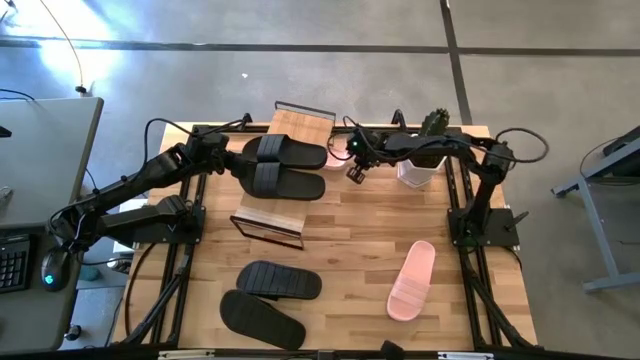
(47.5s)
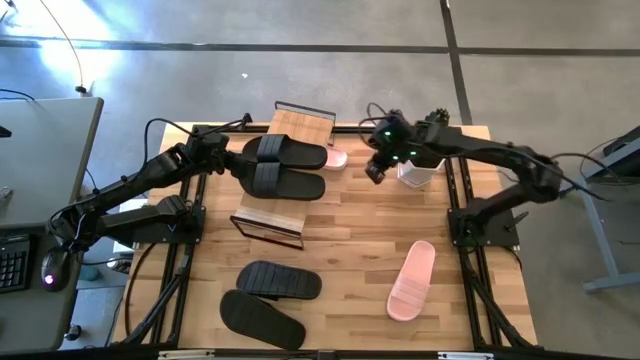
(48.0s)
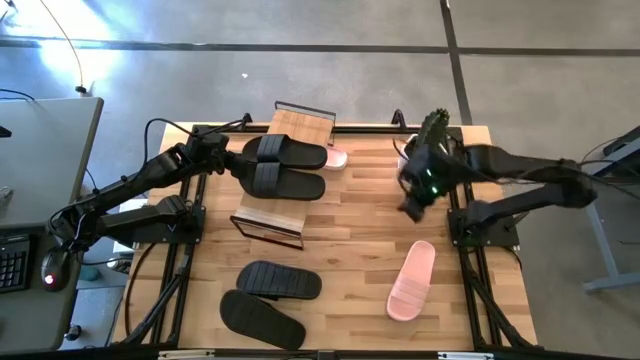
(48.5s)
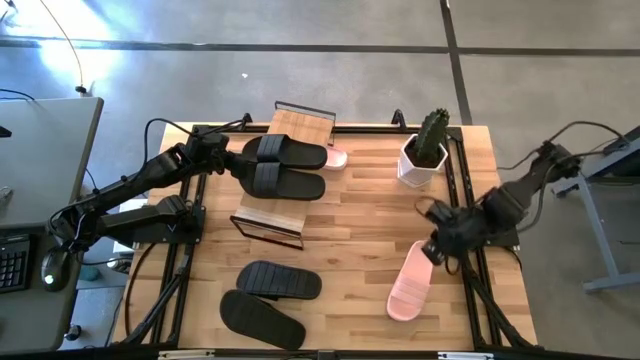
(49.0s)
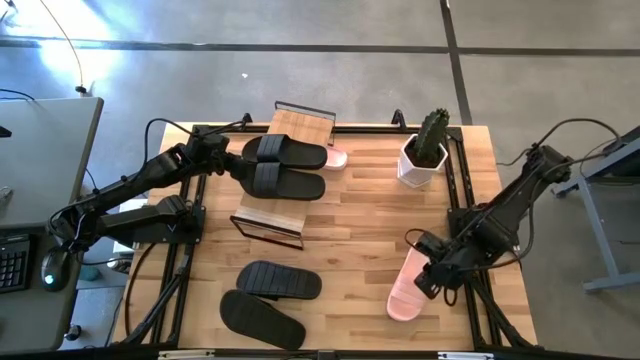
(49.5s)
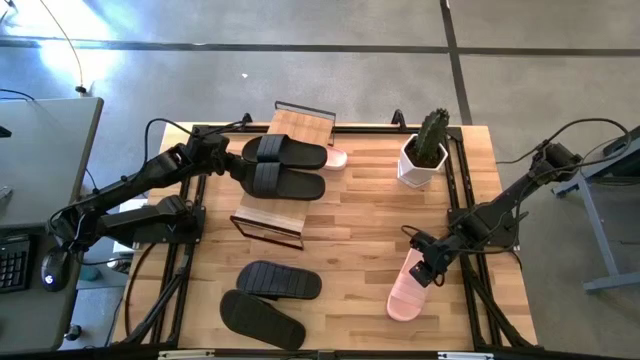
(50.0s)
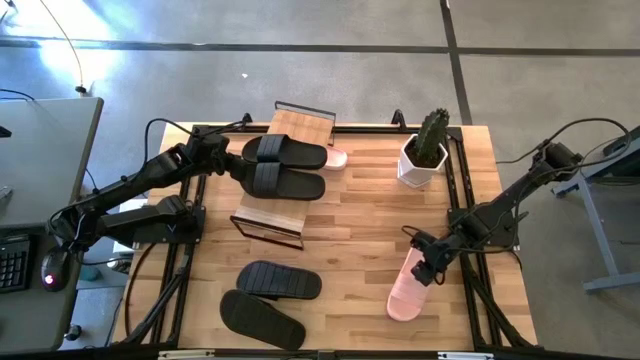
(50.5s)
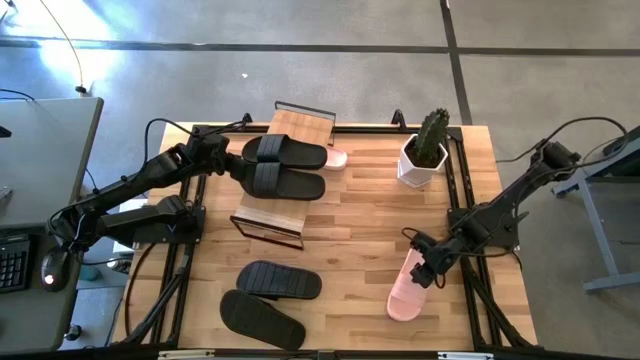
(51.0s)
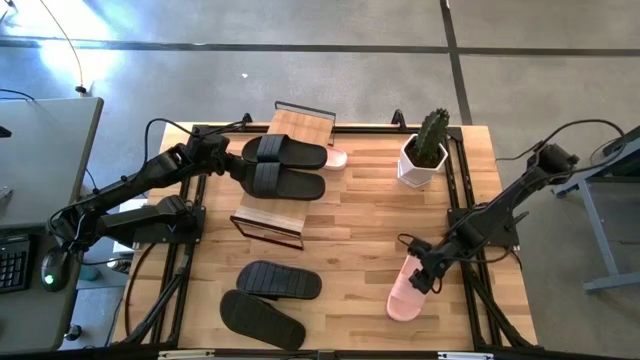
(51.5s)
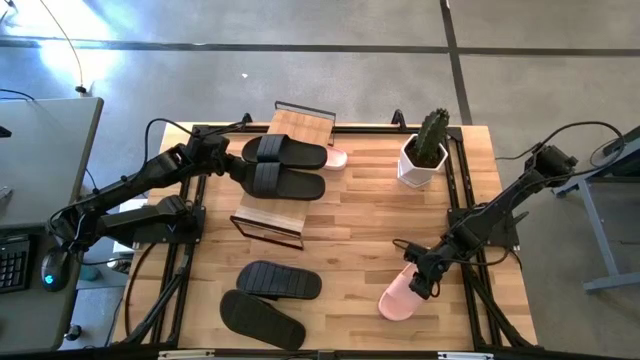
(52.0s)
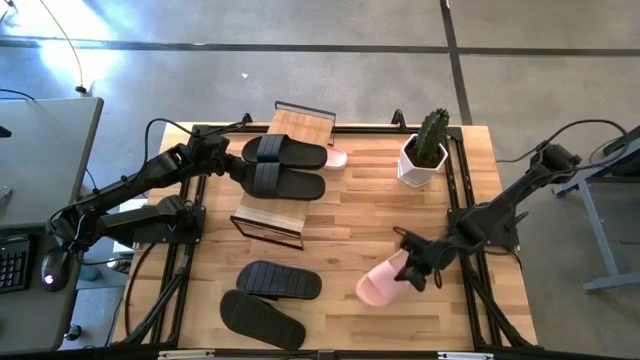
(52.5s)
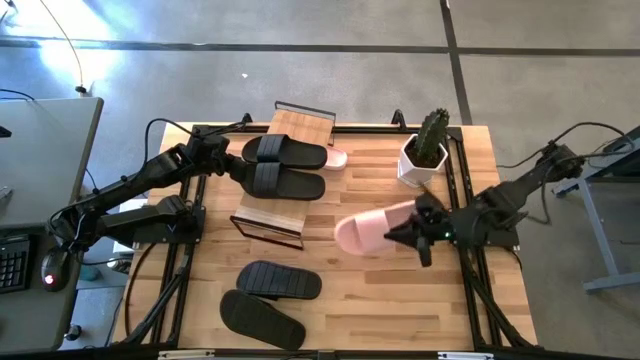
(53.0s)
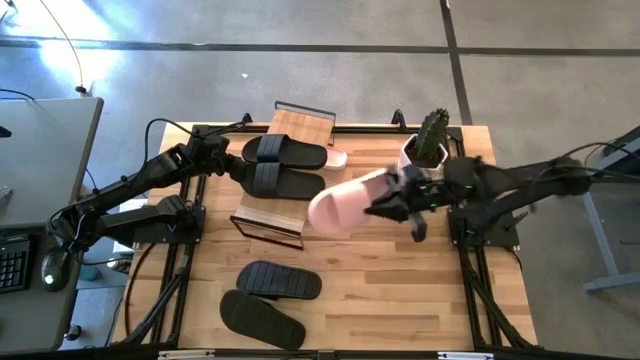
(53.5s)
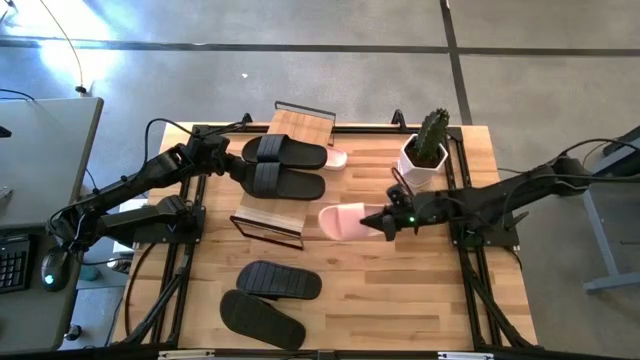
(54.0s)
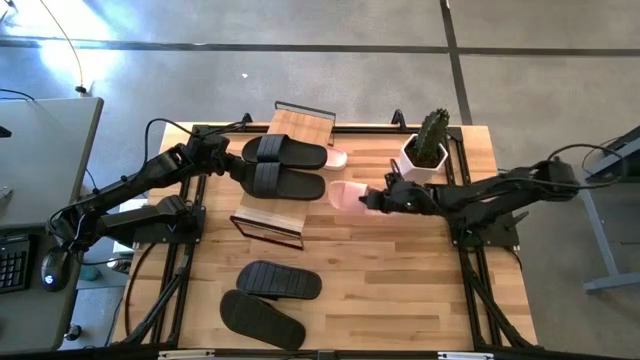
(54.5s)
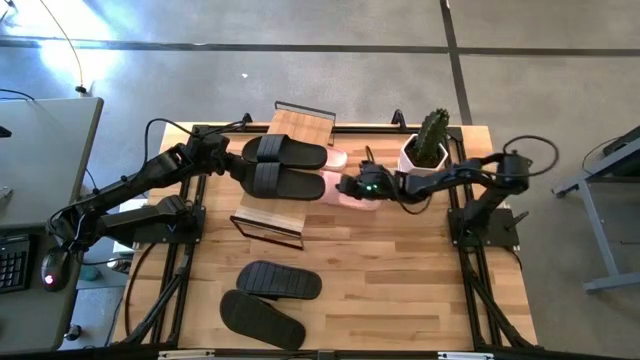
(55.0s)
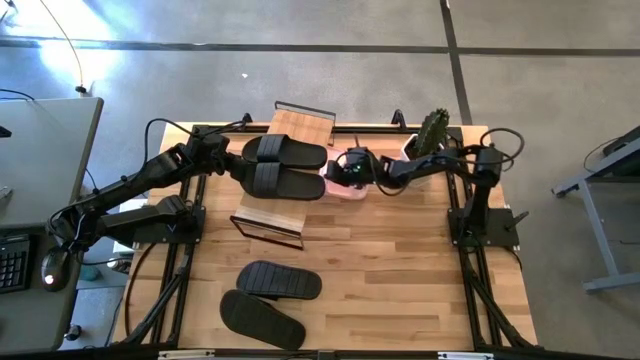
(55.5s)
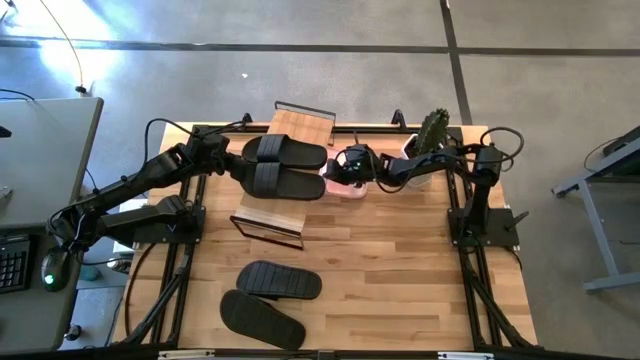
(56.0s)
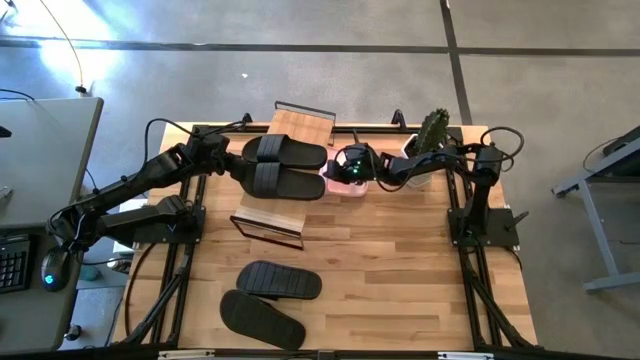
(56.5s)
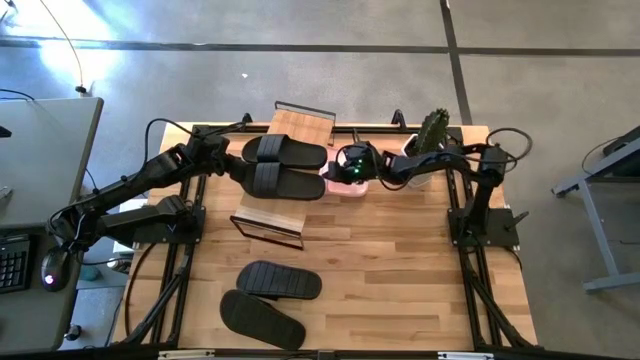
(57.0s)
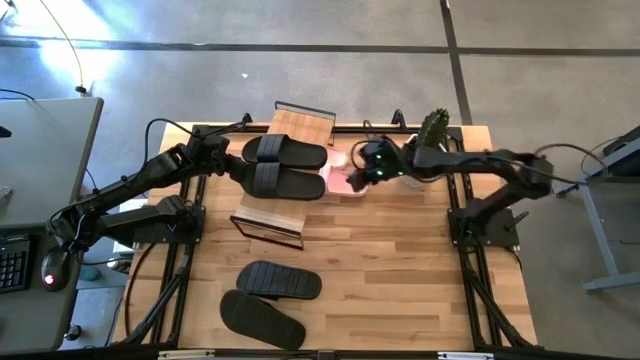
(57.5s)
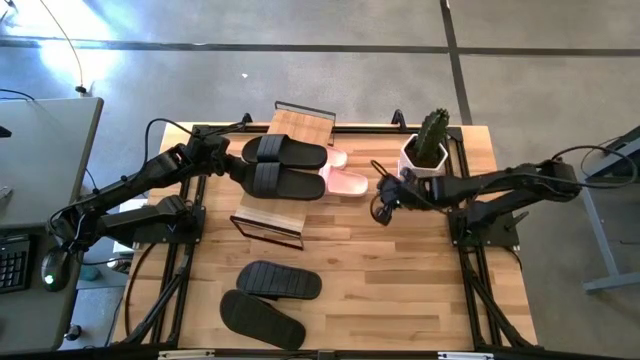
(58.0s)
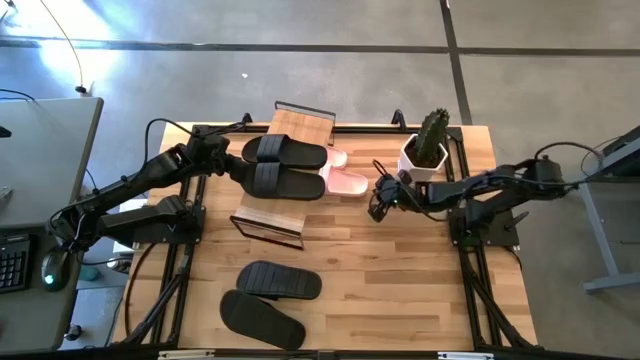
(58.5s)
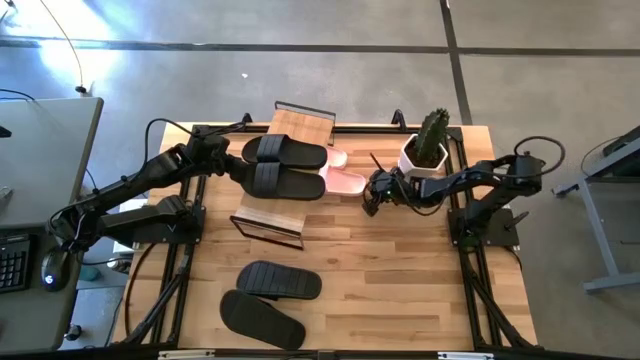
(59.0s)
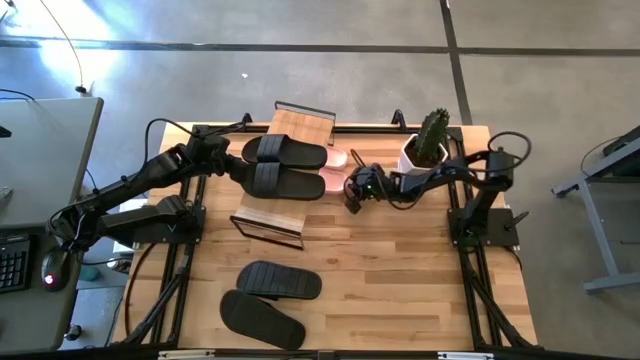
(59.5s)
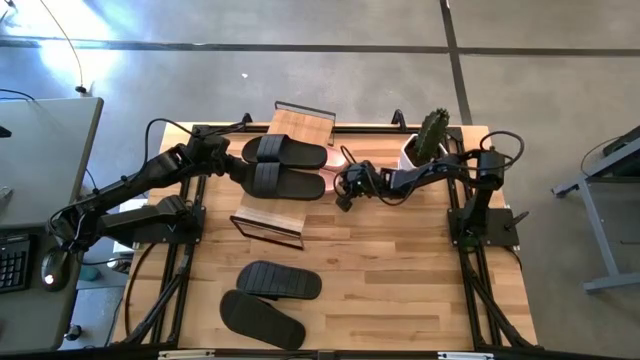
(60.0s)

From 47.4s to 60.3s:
Task: Pick and place slides into the shelf
Put the pink slides under the shelf
